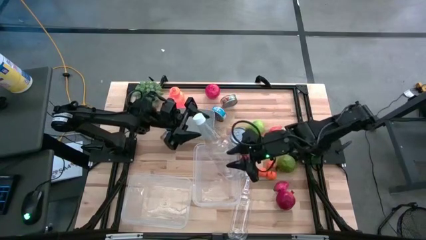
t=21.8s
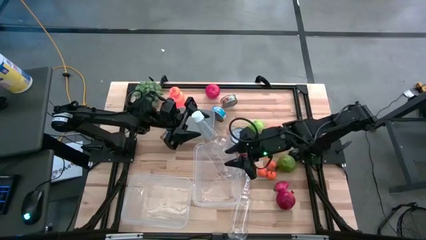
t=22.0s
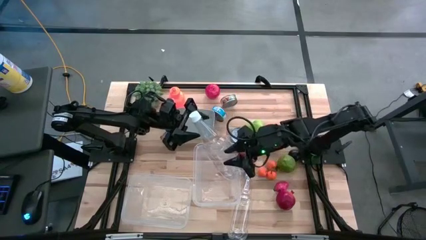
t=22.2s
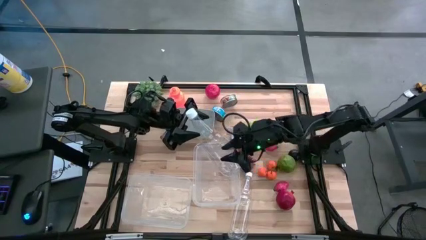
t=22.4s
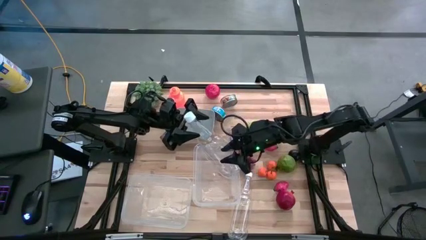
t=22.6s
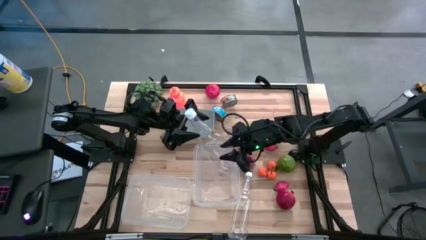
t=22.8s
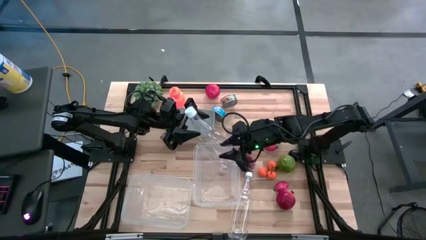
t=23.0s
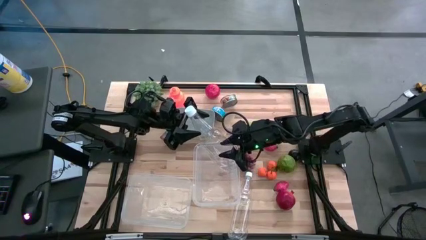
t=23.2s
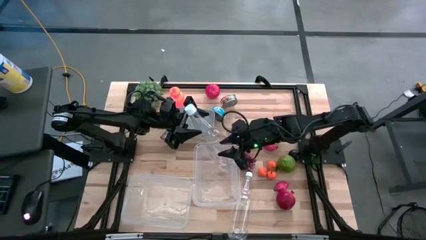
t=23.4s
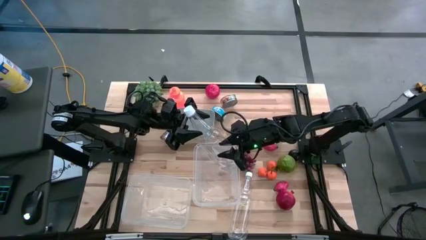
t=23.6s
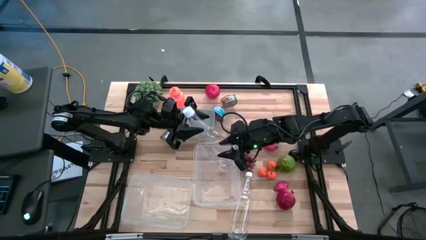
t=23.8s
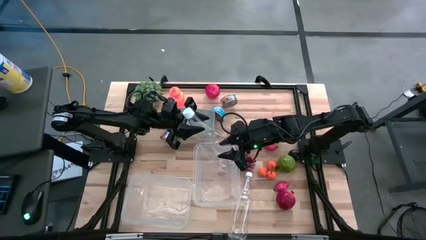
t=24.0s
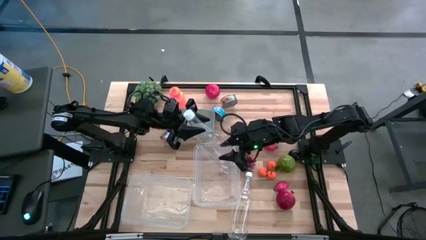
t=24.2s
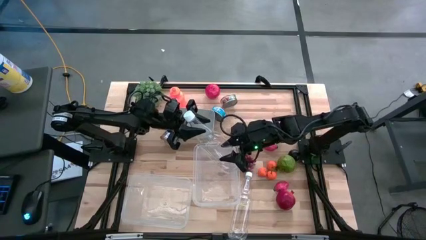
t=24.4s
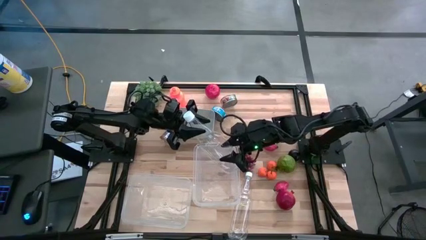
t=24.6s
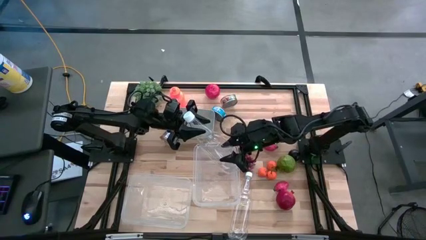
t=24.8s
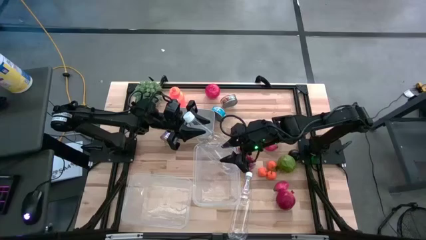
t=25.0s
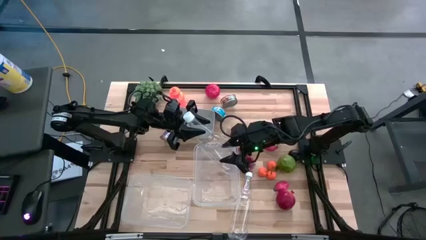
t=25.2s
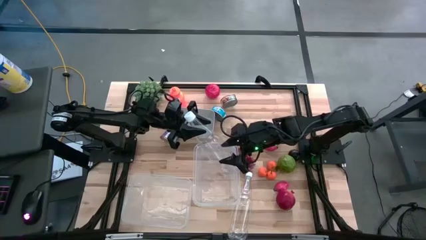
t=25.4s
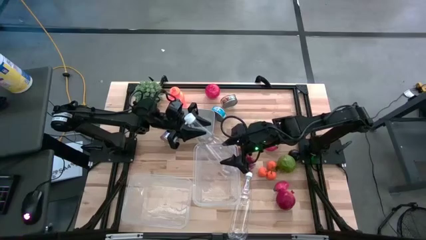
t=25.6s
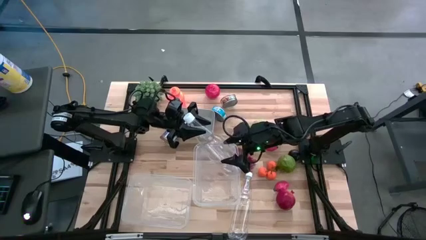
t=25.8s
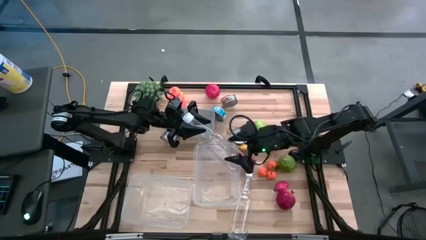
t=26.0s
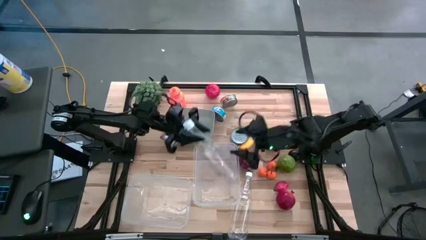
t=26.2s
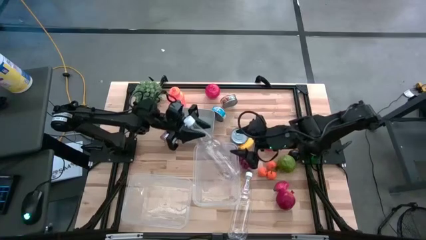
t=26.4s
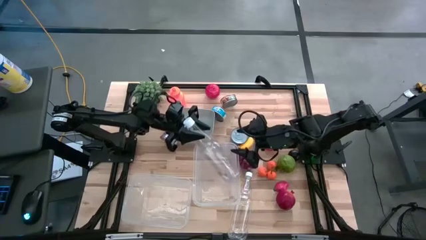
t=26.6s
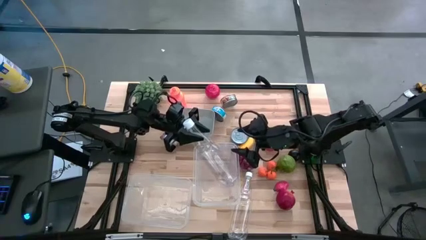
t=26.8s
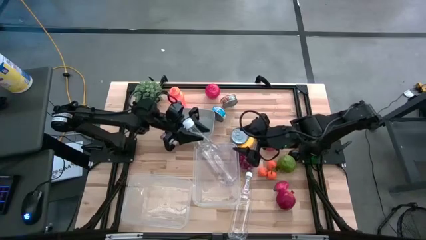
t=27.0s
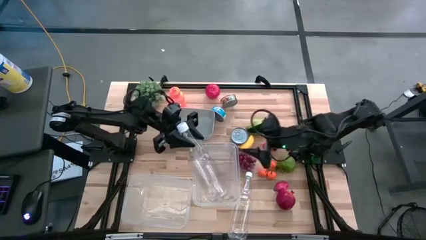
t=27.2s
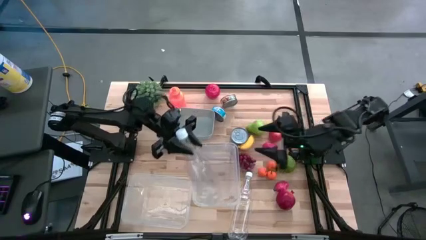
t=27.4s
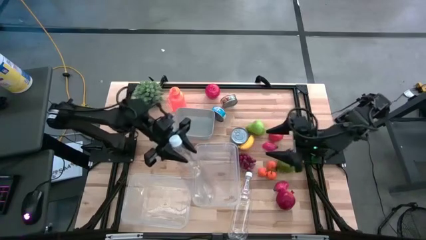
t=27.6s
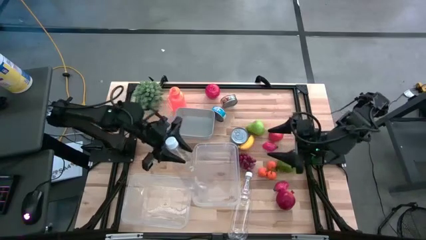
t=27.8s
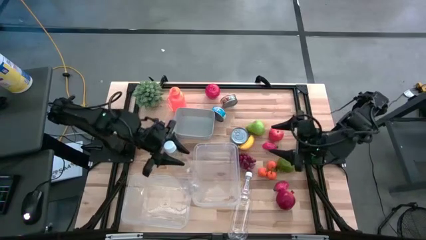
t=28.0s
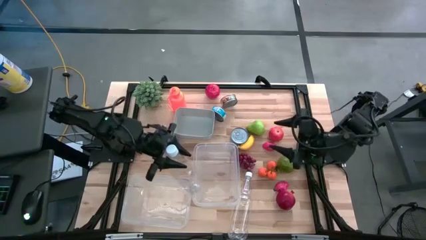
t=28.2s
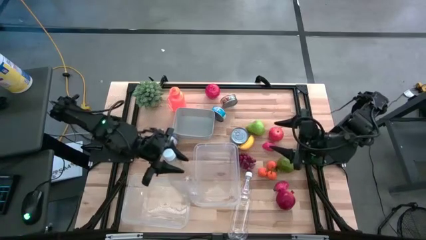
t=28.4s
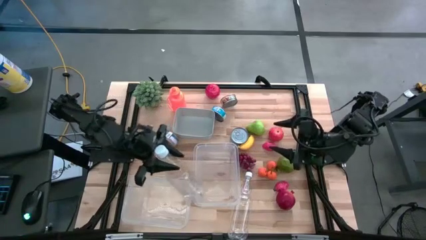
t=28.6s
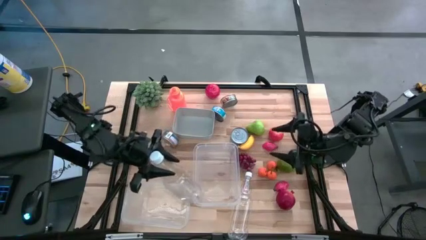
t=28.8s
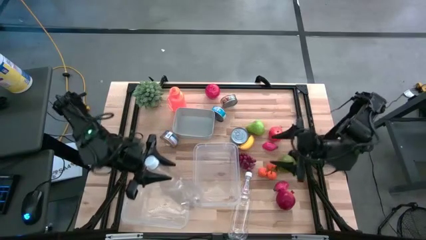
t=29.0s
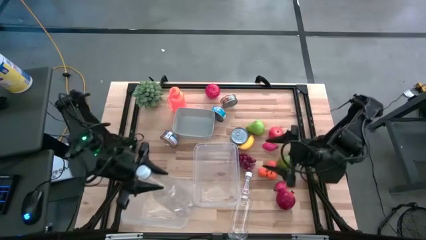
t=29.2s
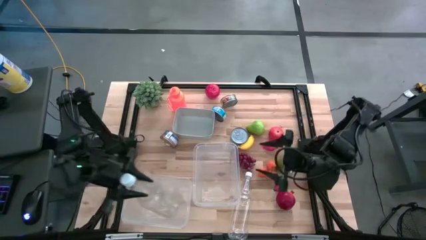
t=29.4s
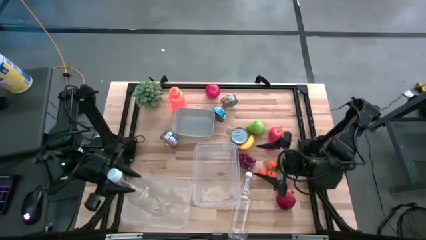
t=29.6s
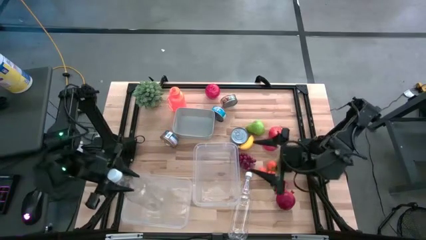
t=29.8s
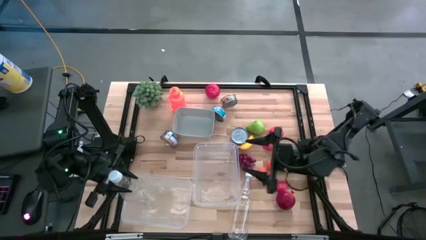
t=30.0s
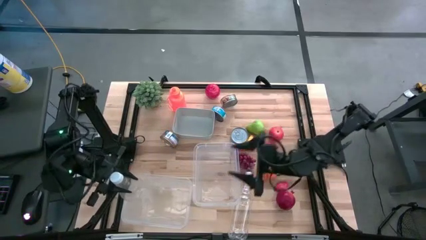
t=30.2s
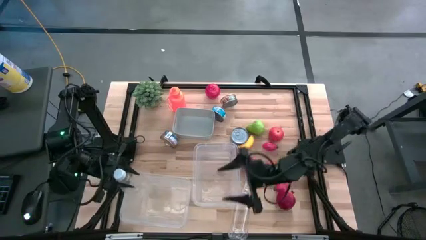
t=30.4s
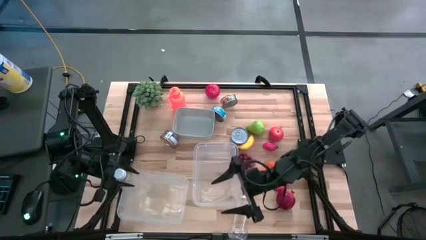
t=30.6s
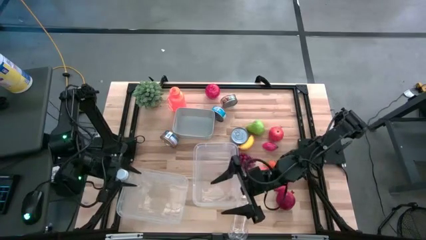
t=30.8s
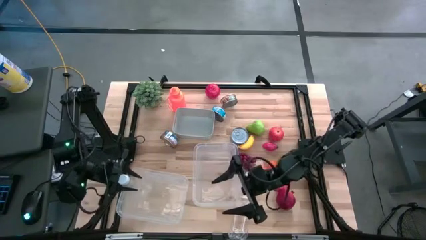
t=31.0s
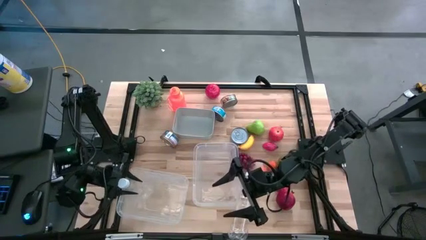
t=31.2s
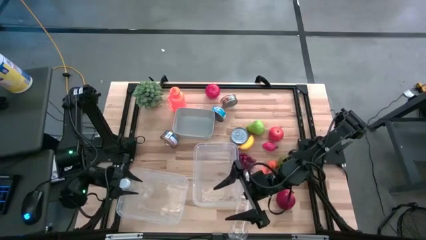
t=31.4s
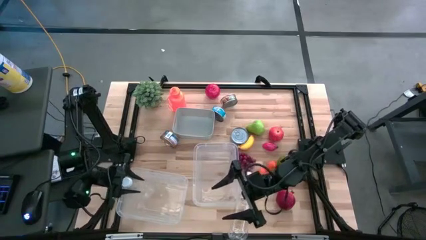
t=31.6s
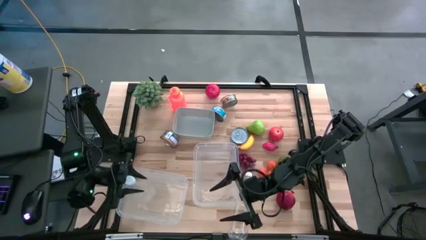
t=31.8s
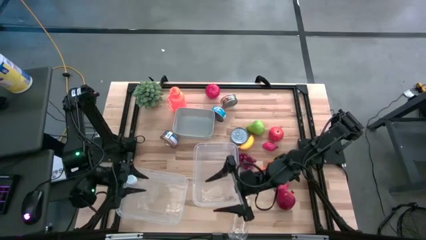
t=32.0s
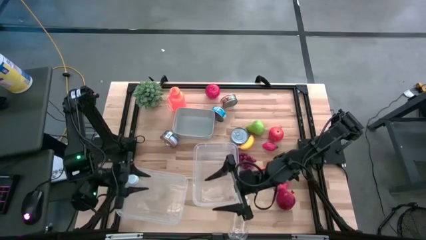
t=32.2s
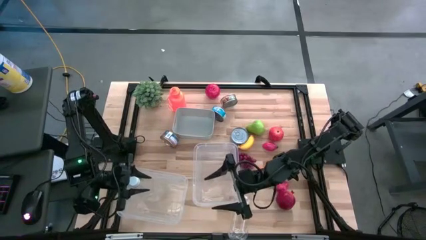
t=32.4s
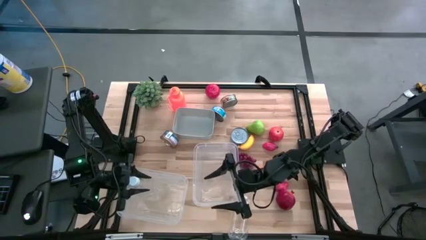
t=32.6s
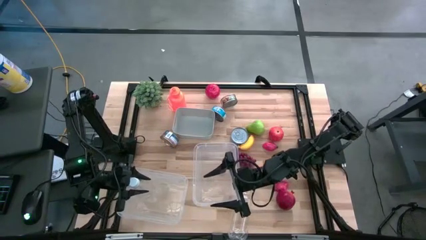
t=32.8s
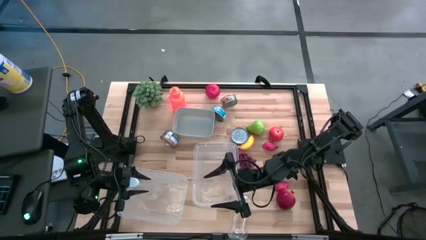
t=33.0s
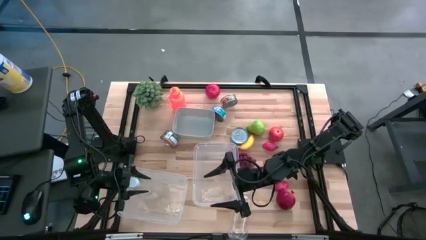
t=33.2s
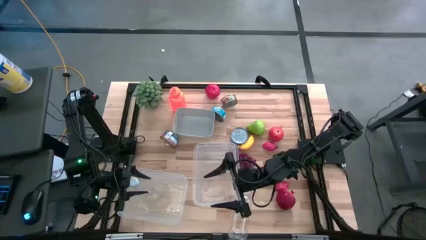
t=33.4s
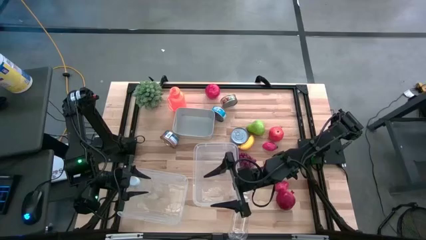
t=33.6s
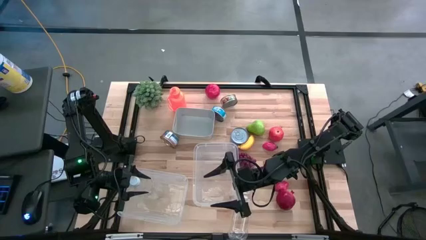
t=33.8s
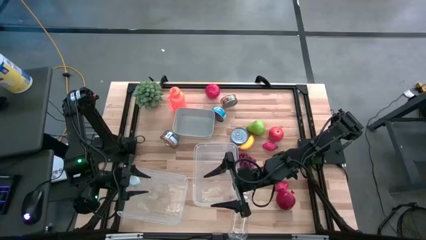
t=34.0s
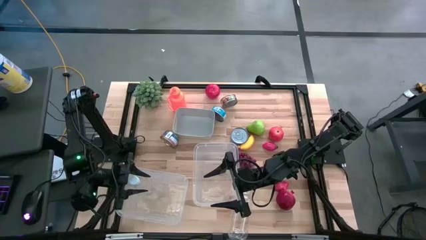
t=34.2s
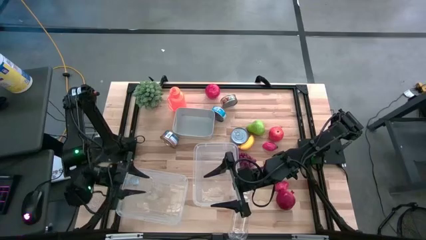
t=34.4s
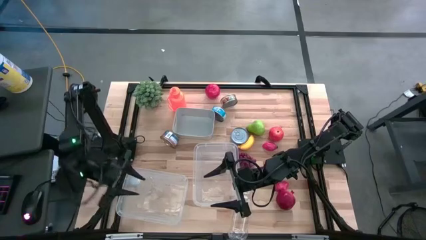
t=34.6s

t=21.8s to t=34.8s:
Task: Pick & Place Food Item
Put the top transparent plastic bottle into the left transparent bin
